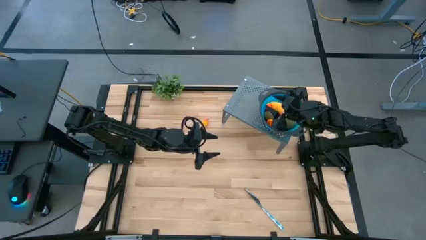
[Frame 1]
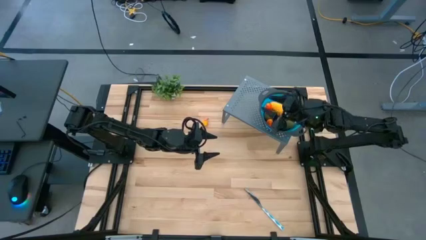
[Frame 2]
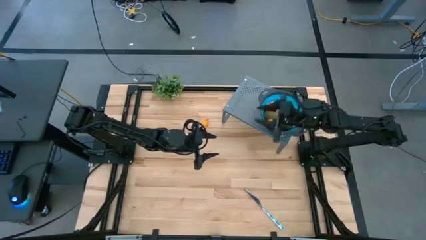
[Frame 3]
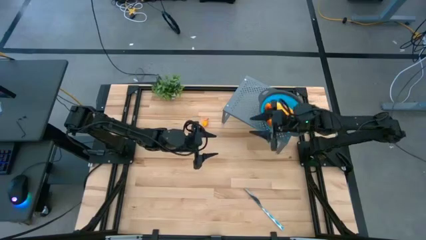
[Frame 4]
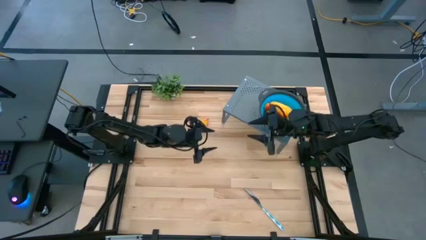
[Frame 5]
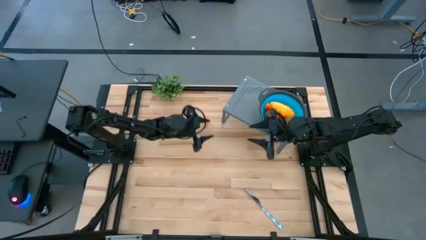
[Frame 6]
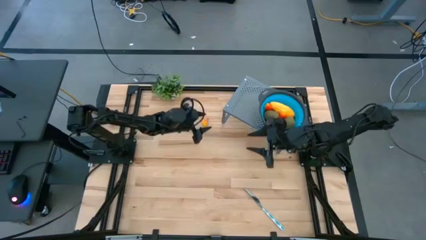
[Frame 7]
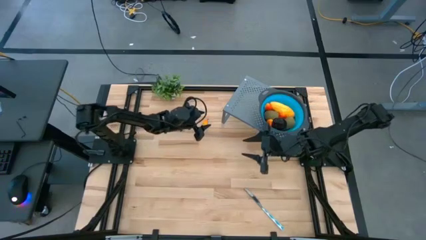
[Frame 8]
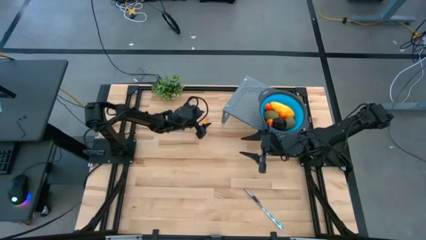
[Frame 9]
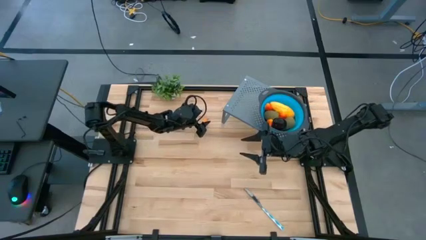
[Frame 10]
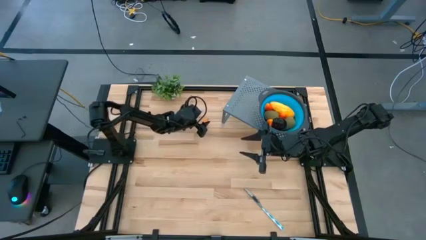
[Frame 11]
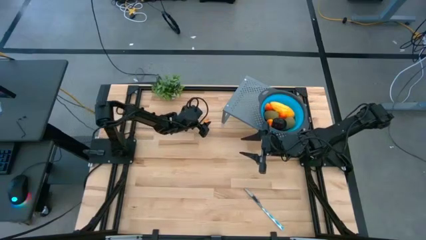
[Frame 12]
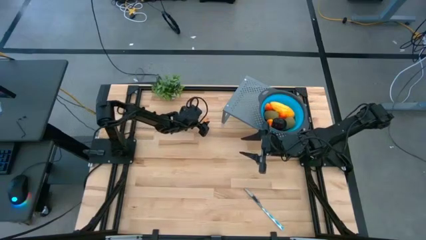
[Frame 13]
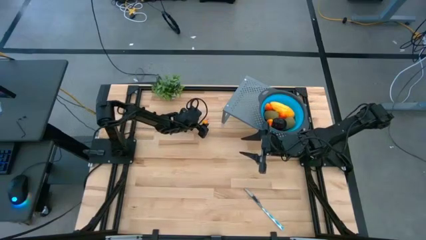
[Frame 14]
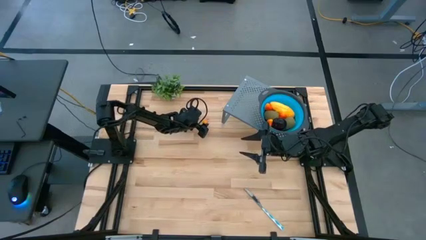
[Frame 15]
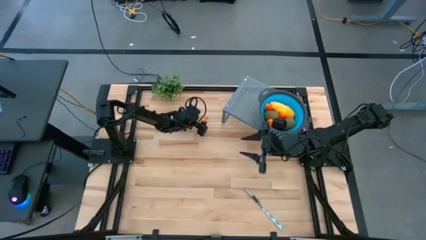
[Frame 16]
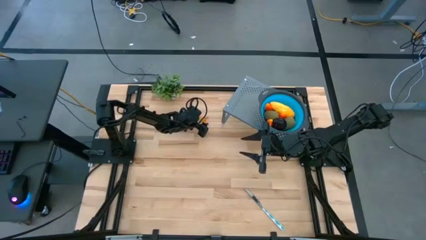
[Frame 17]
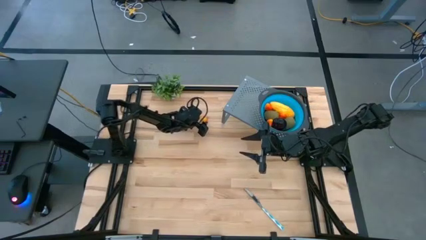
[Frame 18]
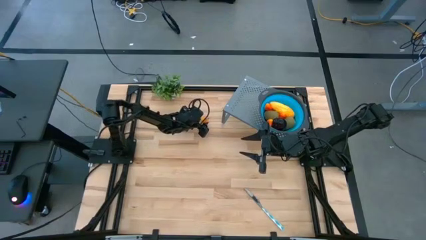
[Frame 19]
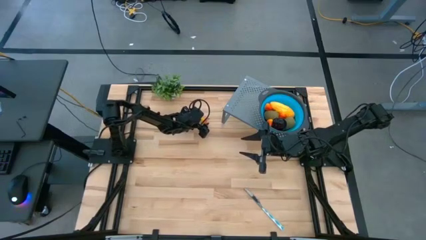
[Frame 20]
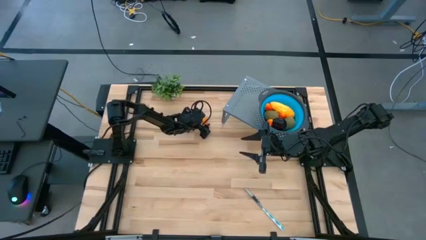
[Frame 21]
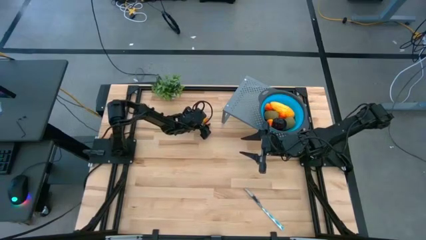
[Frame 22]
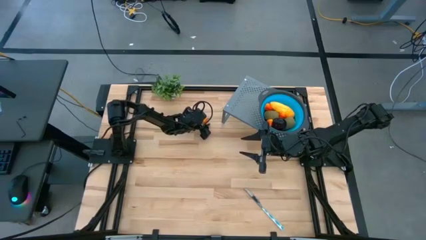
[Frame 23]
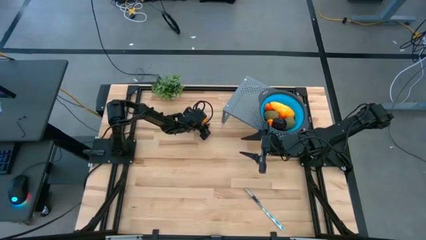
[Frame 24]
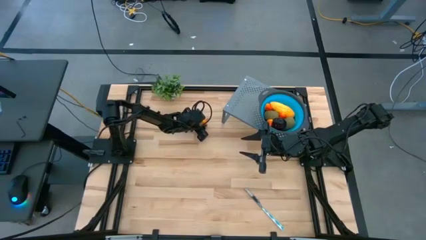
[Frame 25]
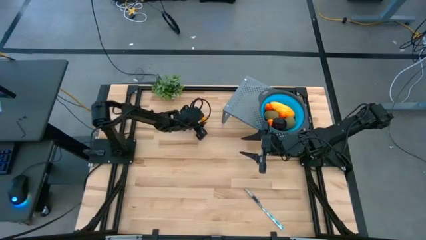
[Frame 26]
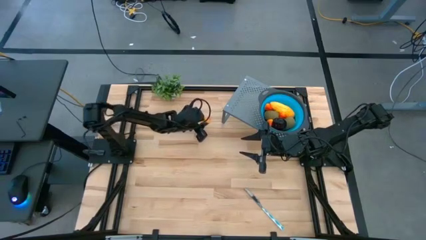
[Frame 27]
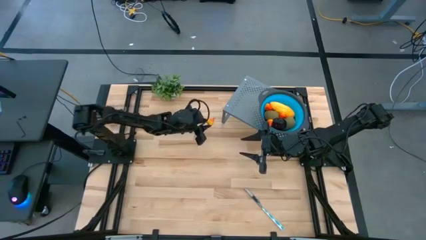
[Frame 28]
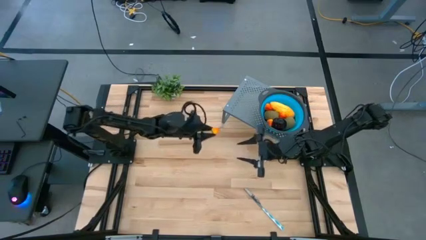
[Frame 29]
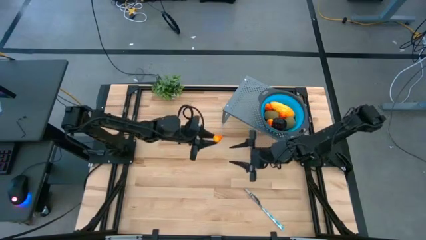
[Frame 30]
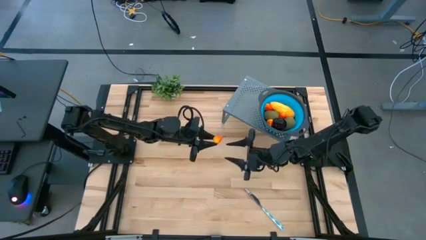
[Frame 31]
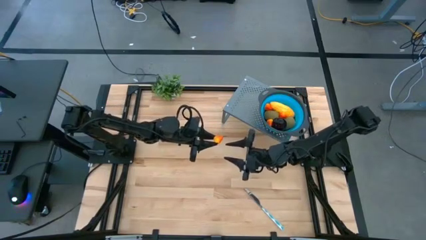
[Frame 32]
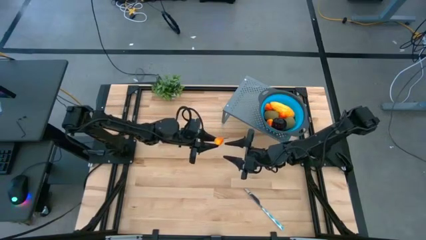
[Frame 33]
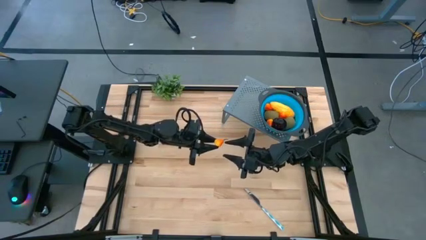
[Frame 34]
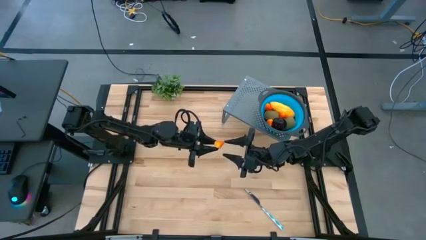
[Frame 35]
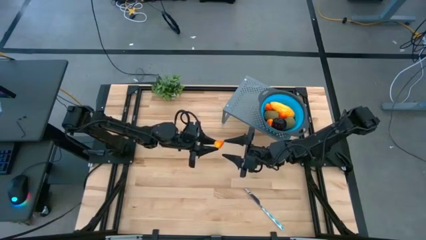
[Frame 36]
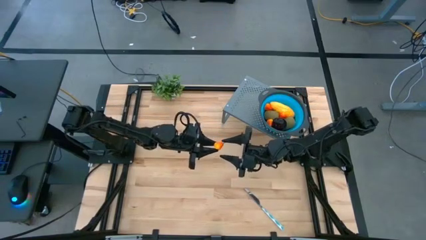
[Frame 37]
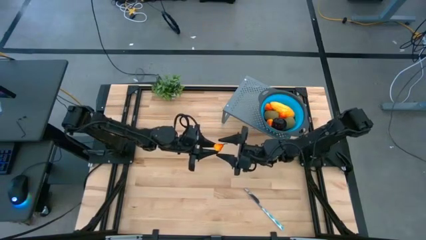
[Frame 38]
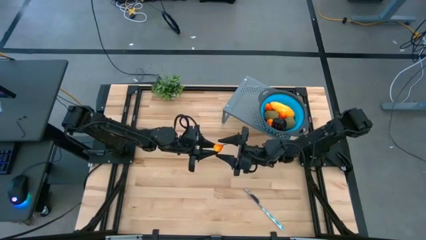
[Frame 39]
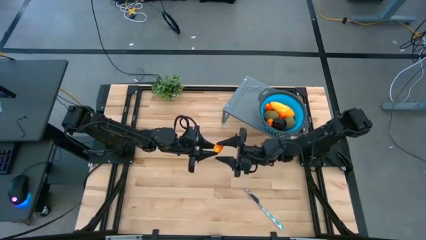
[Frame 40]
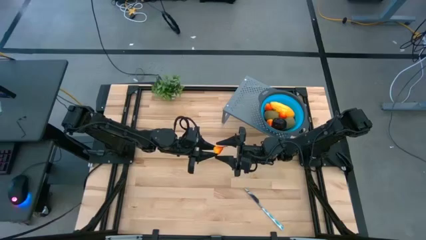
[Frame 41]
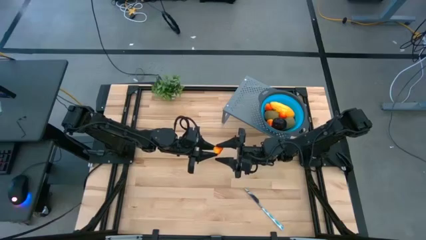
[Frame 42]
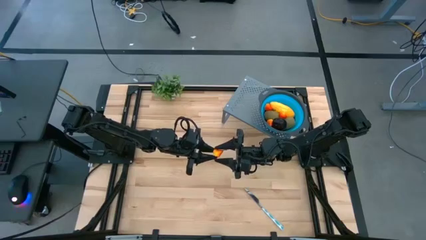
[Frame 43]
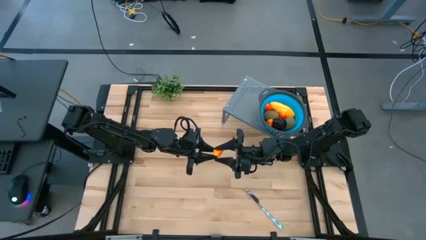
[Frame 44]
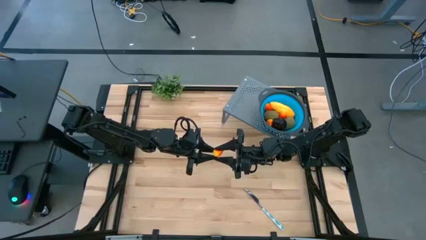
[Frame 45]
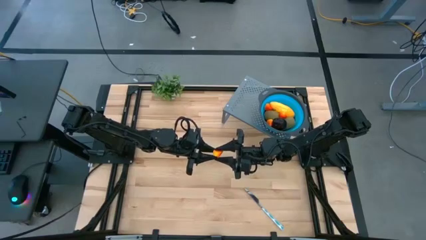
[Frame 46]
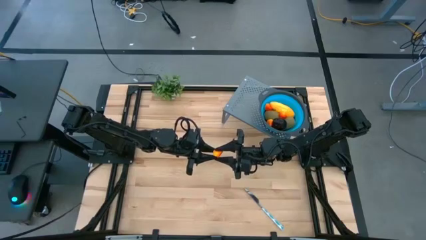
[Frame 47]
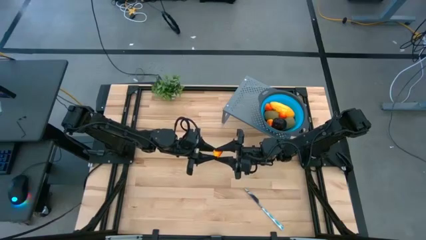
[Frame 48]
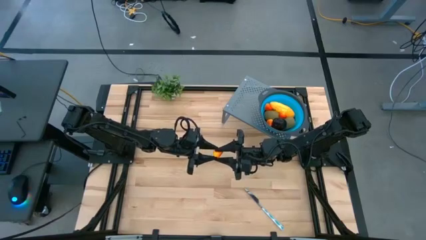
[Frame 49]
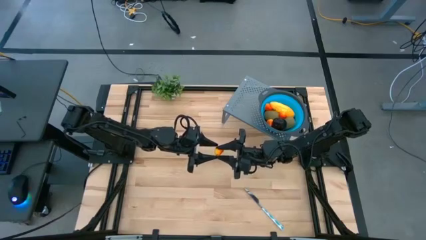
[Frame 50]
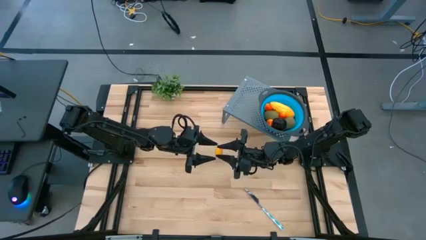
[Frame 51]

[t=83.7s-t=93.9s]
Task: Pick & Place Fruit
Put the pear into the strainer bowl on the shelf

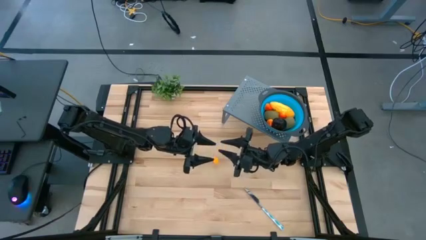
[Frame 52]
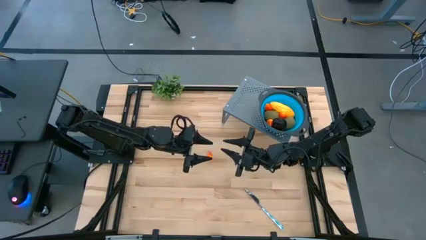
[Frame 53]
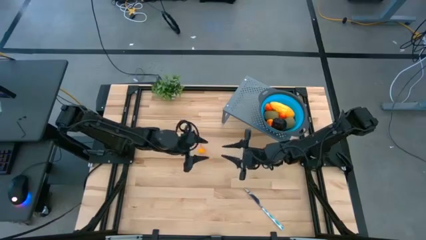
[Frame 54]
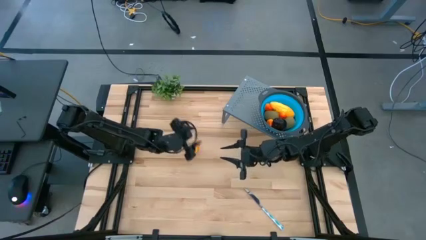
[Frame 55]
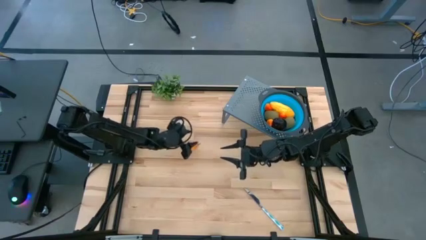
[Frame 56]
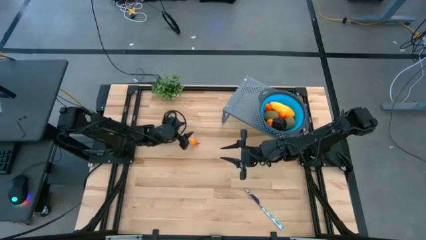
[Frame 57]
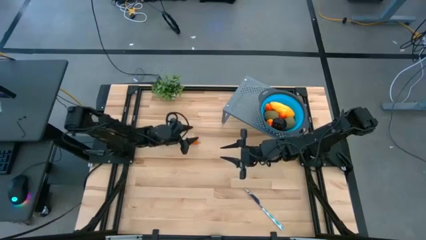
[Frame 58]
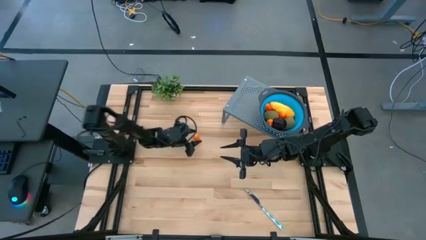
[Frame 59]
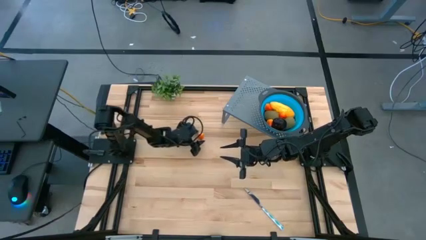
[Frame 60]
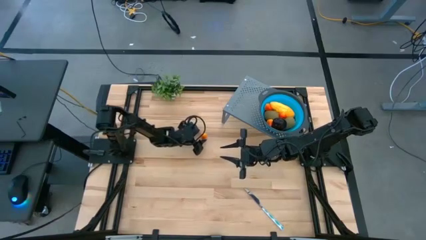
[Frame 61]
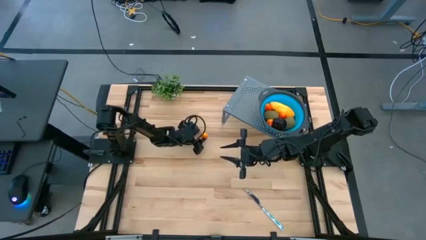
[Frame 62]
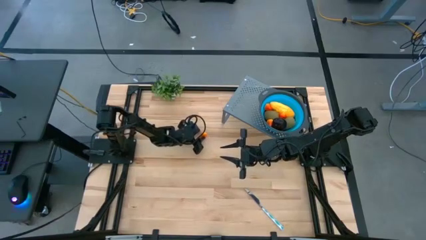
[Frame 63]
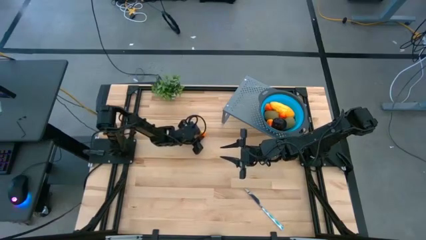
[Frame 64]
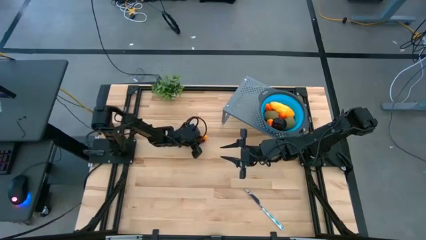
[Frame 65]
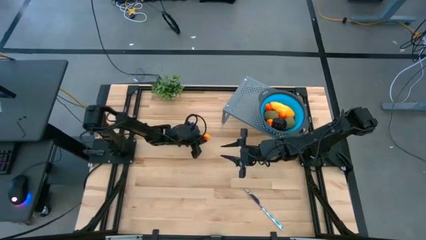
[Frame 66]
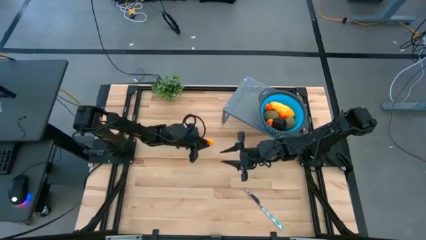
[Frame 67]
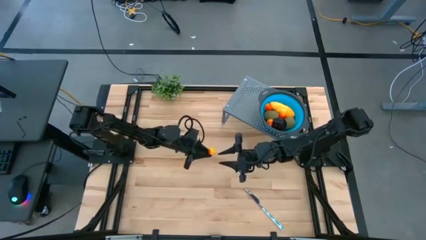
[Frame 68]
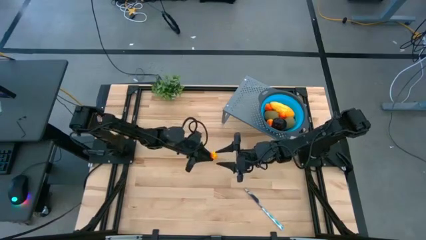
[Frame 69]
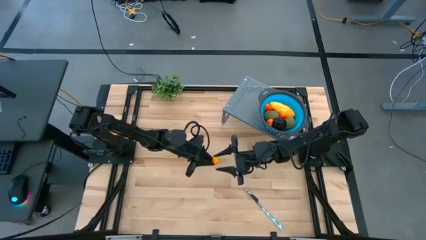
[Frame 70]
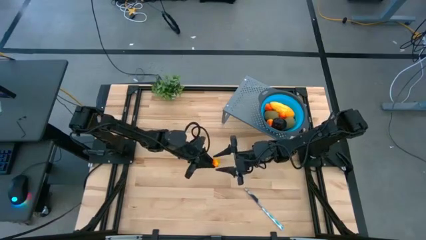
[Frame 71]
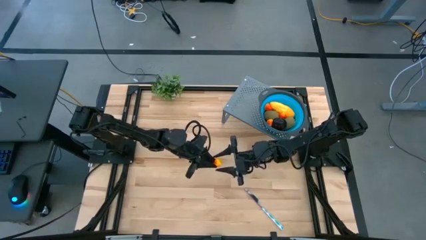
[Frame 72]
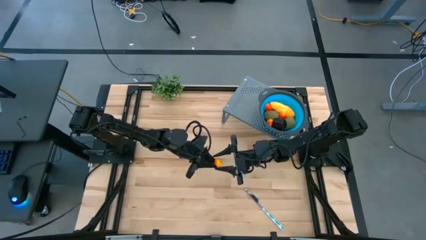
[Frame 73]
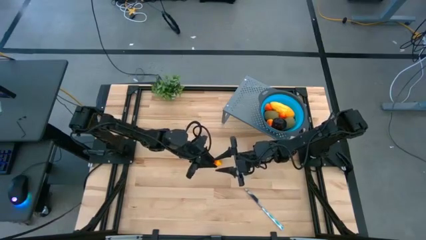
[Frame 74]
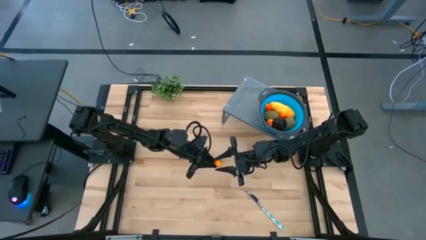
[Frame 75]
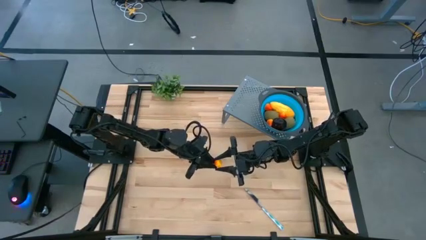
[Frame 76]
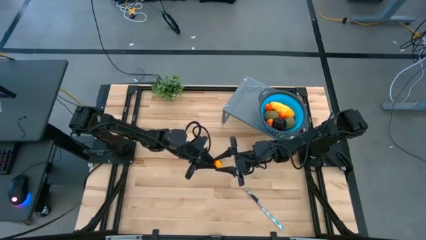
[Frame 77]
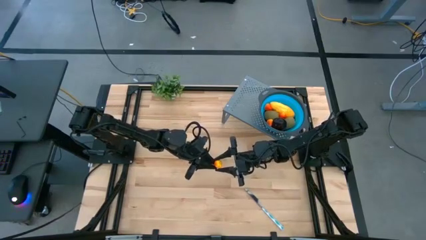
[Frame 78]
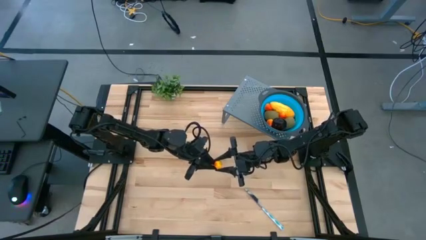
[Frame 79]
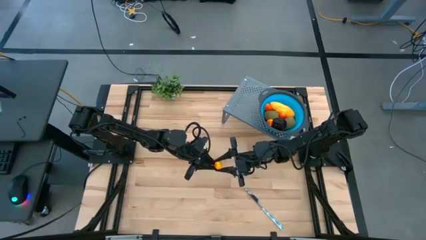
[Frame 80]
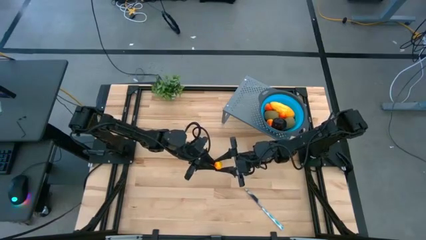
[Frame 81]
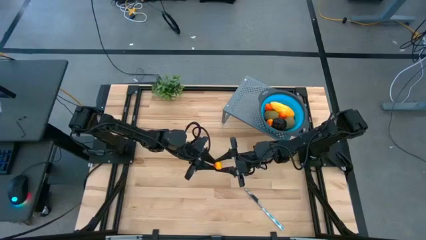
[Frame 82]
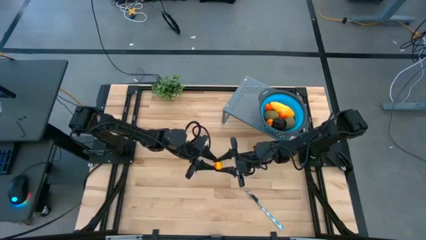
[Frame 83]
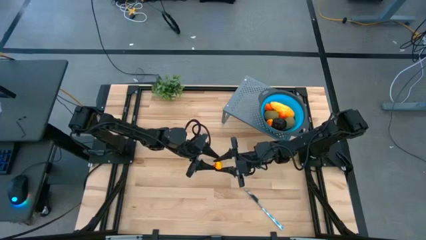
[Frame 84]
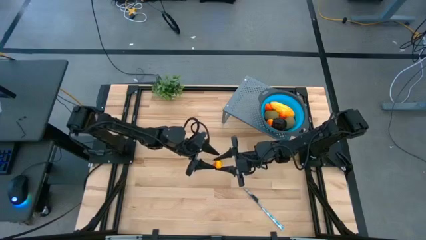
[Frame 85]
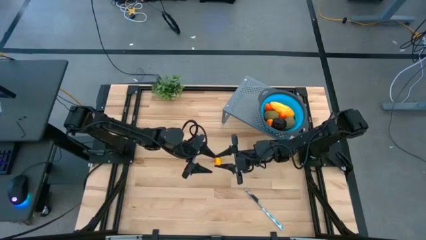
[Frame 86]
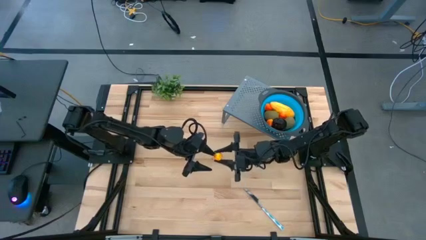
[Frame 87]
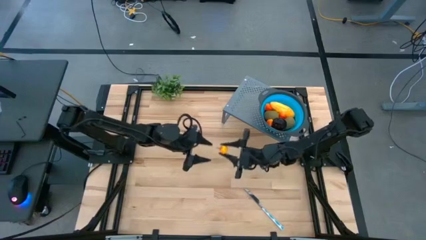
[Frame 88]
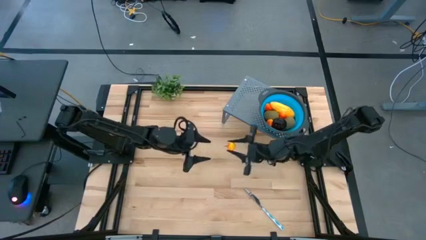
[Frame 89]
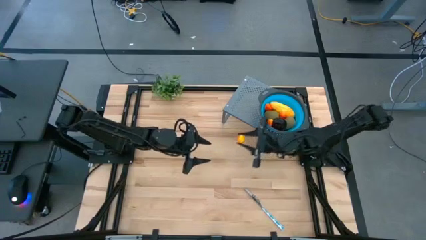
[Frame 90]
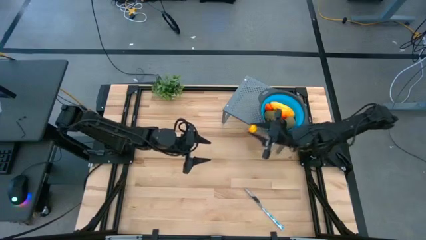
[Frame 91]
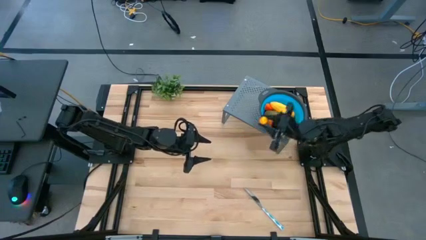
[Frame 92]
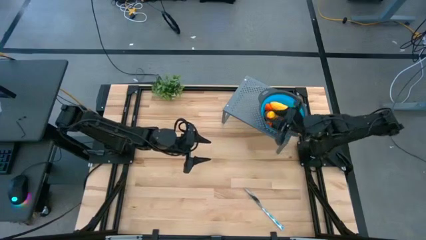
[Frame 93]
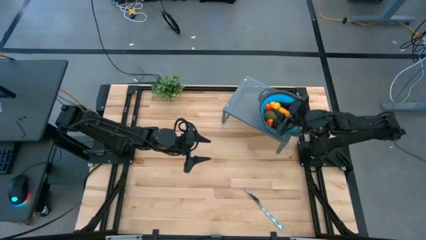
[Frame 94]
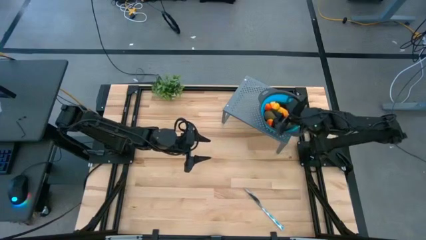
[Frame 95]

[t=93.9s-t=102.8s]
Put the pear into the strainer bowl on the shelf
